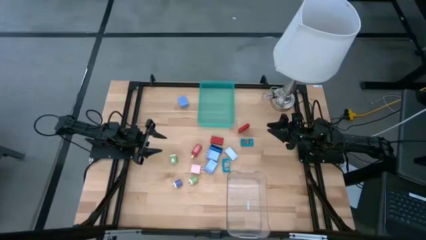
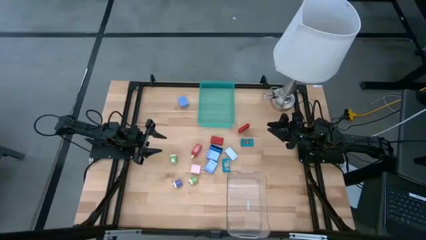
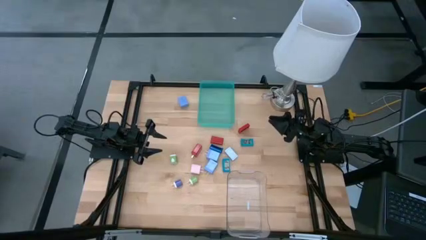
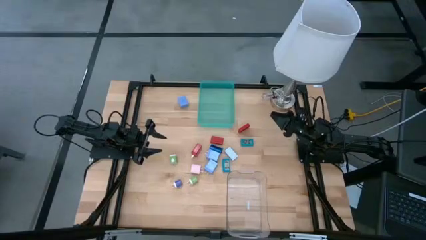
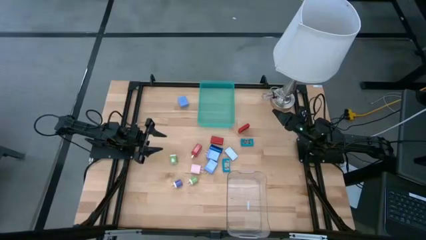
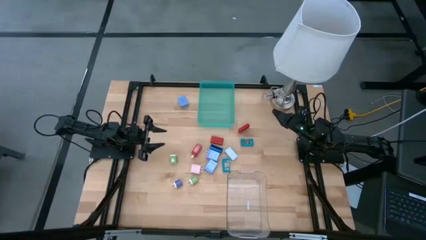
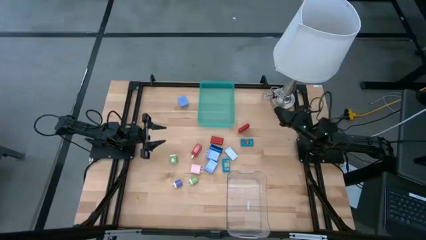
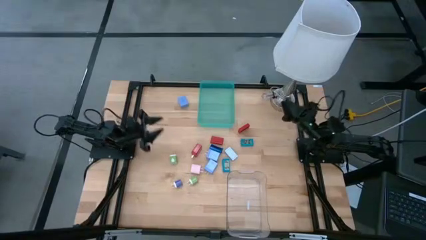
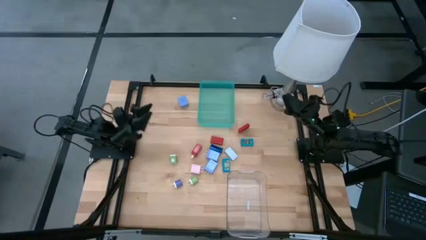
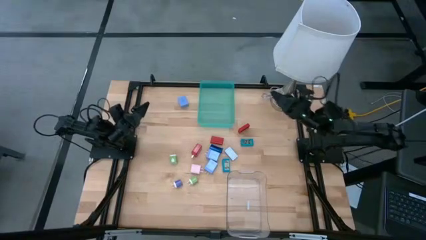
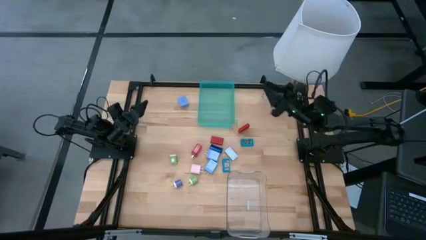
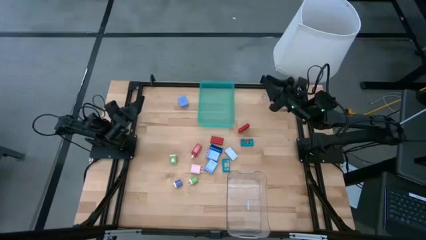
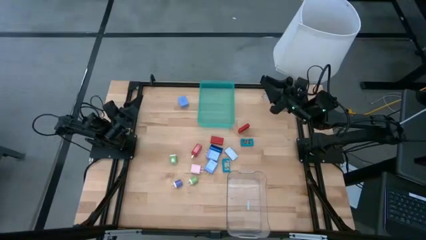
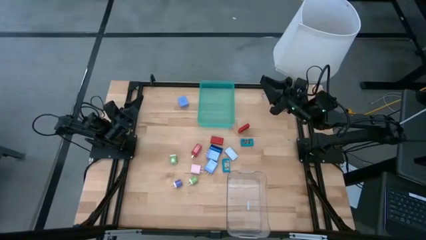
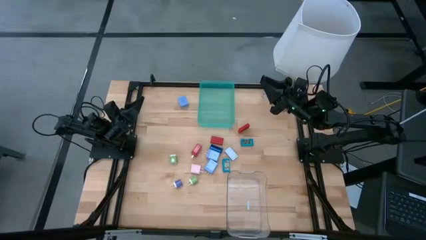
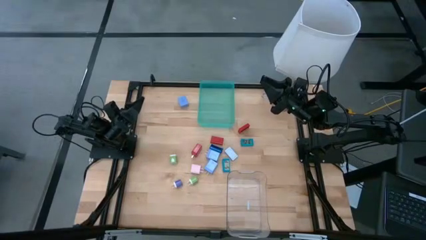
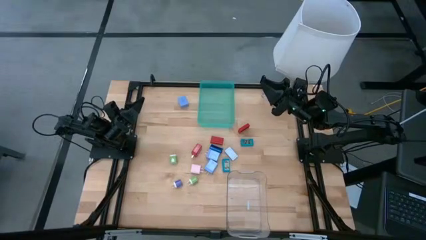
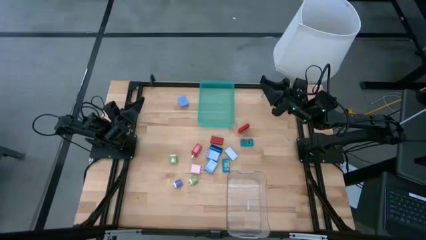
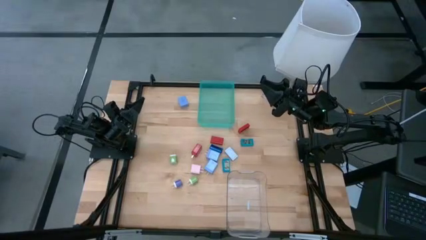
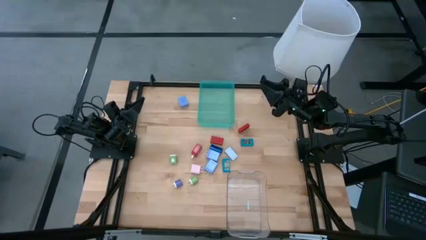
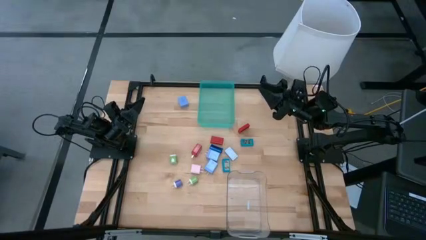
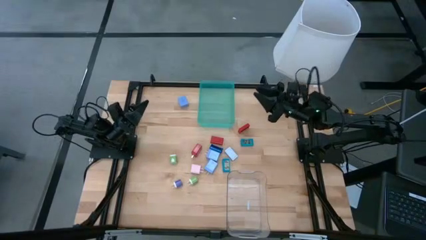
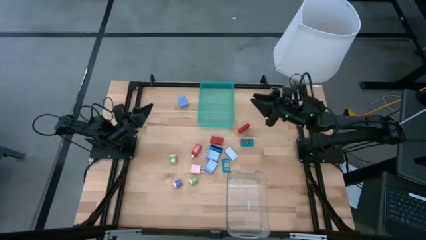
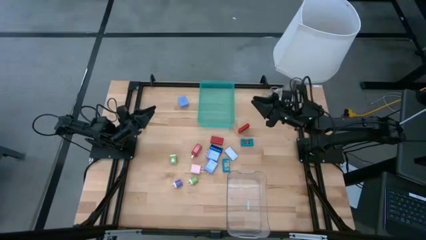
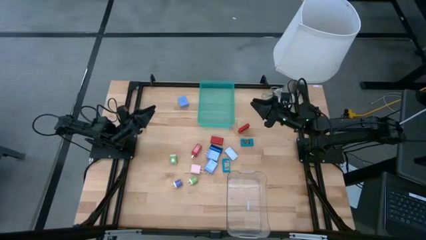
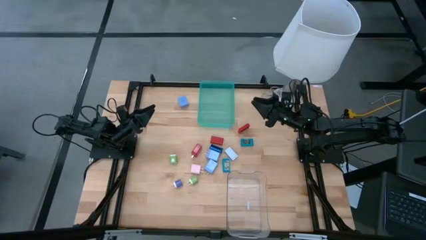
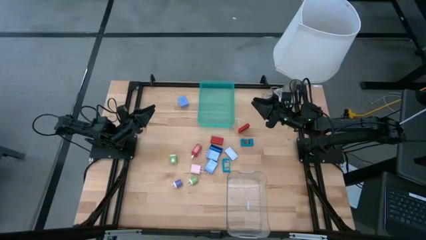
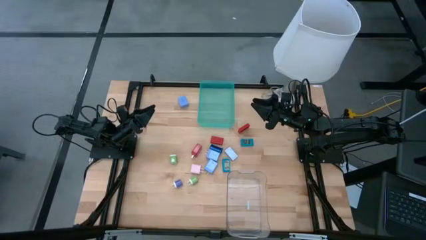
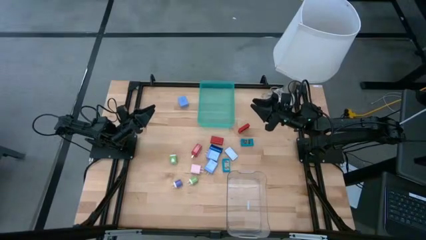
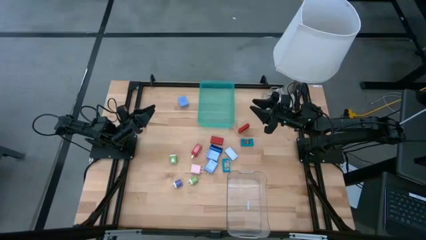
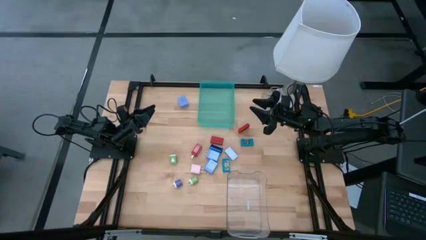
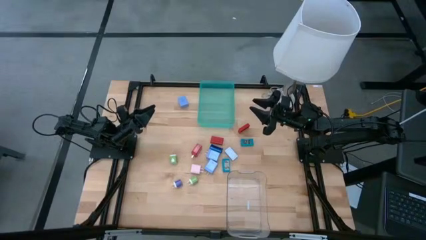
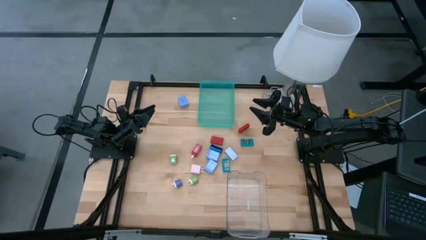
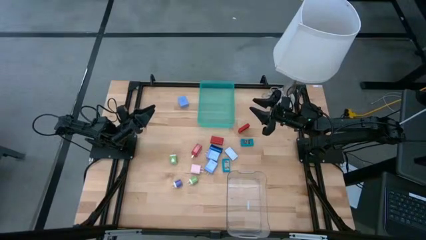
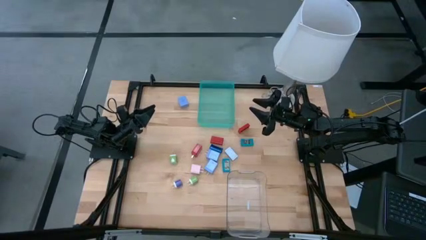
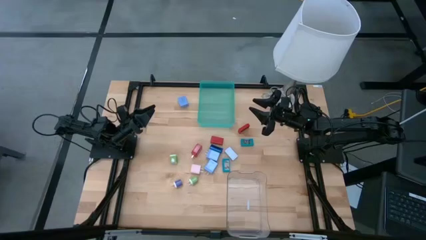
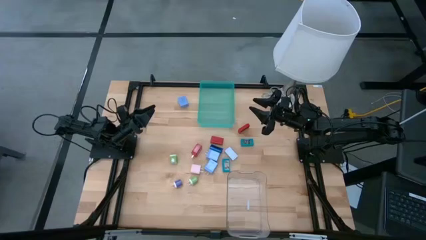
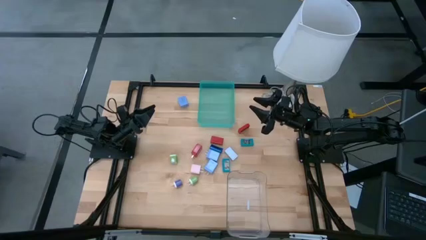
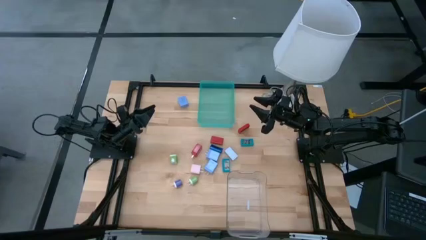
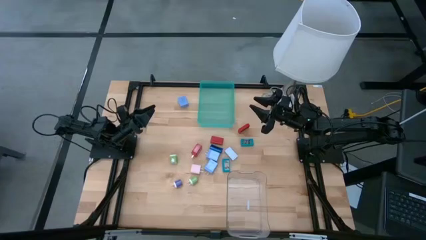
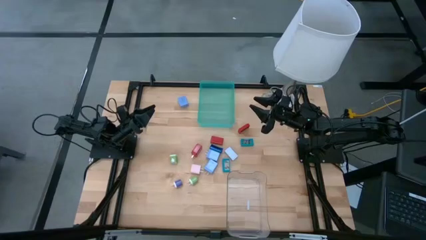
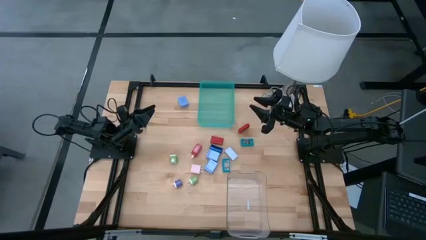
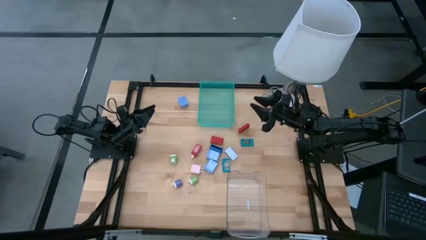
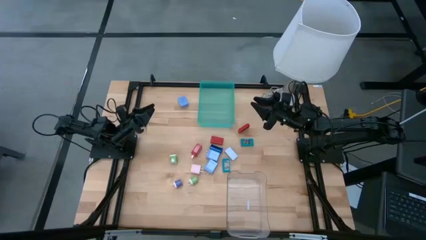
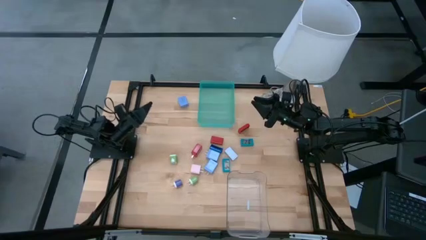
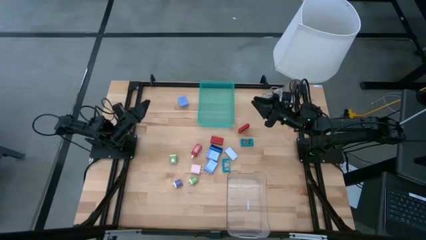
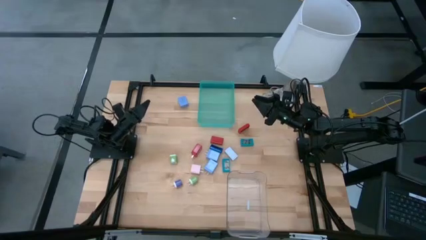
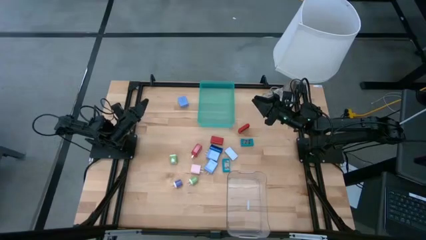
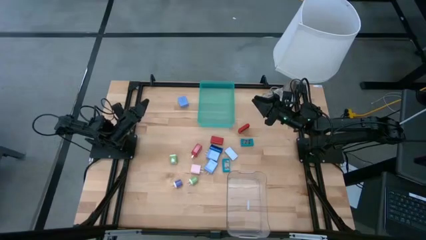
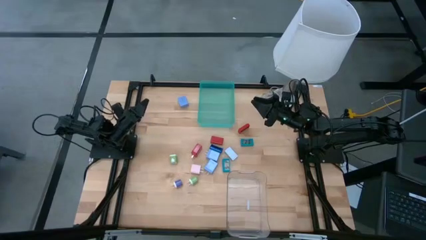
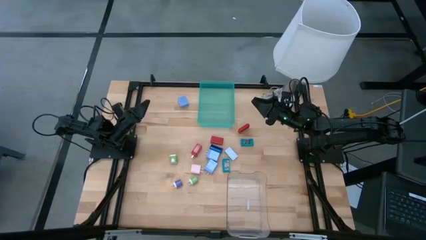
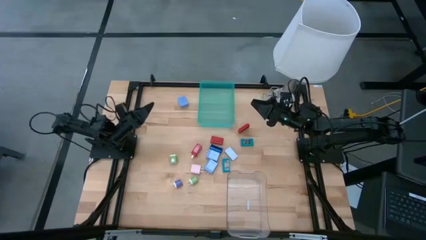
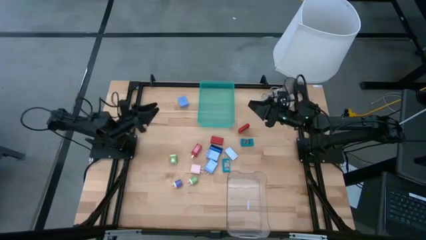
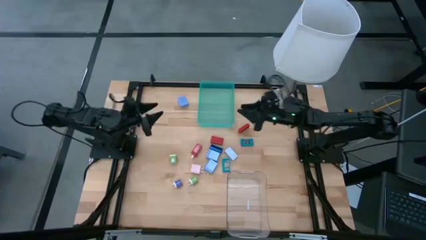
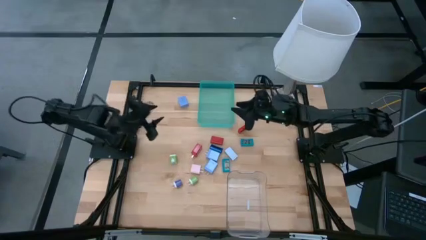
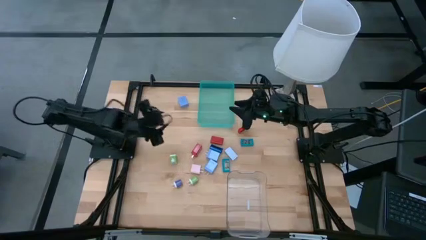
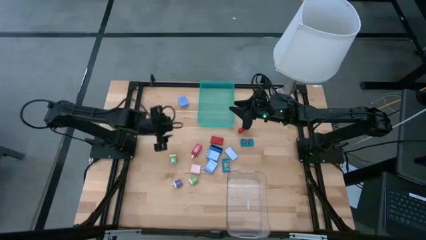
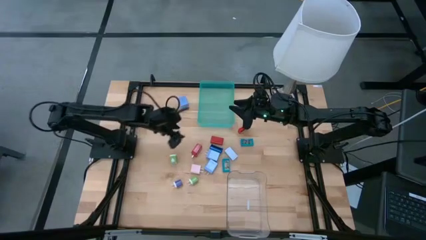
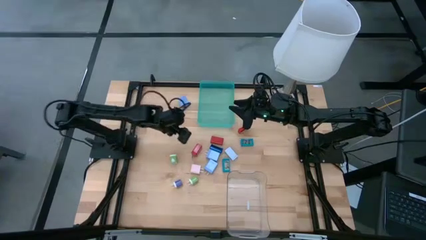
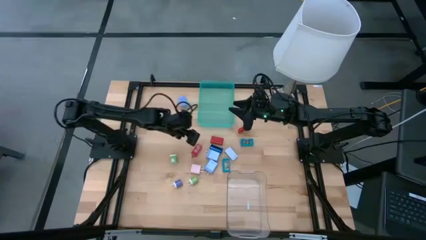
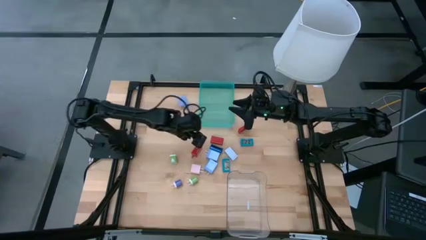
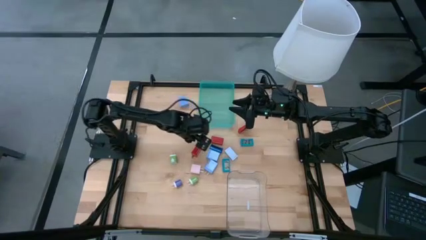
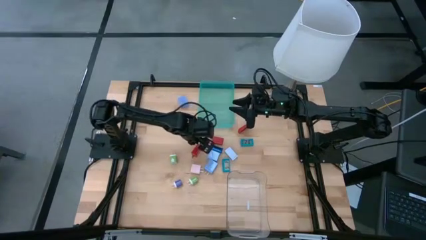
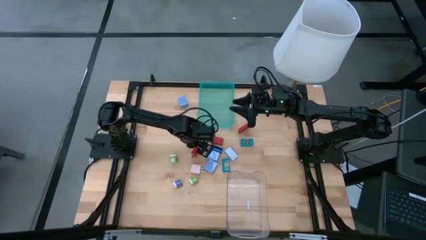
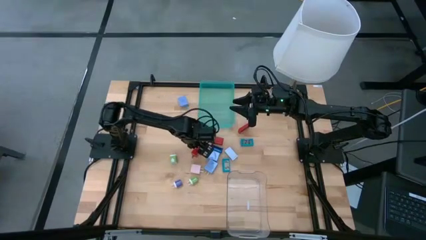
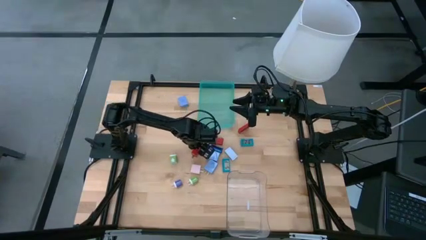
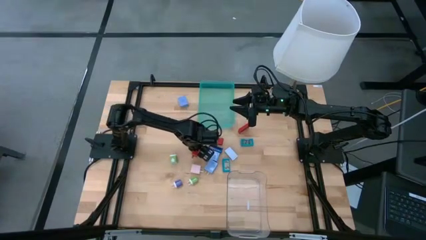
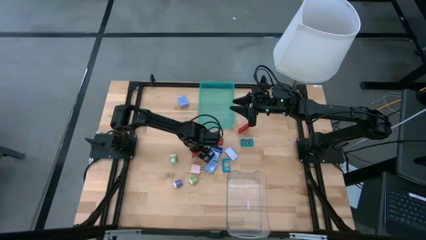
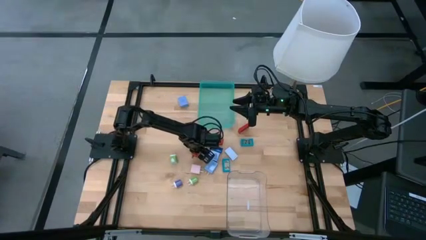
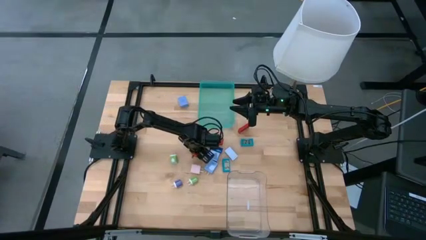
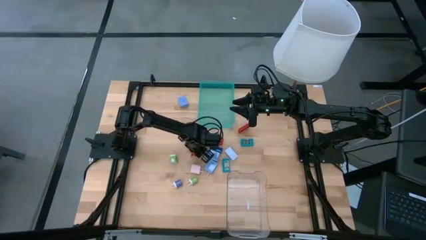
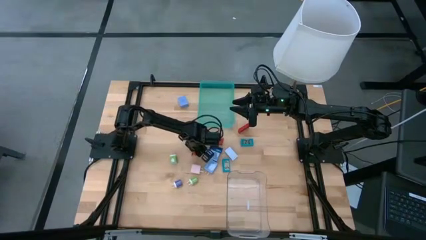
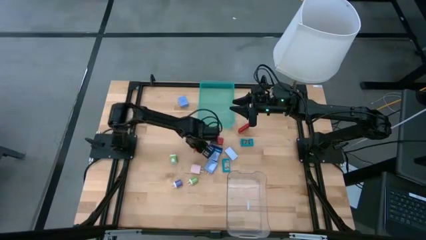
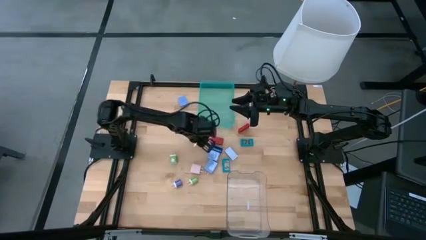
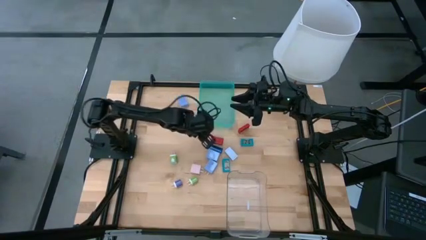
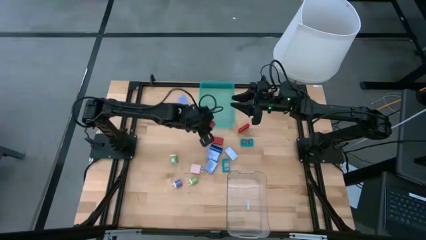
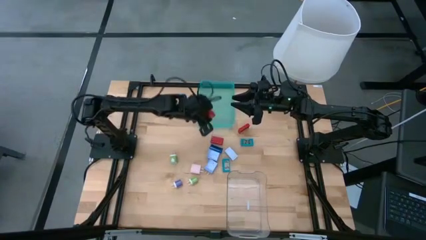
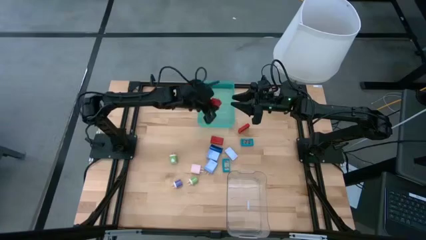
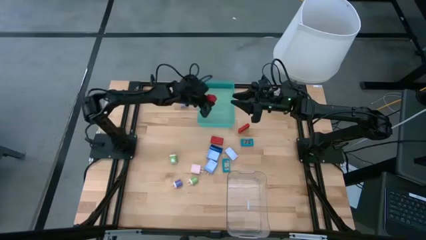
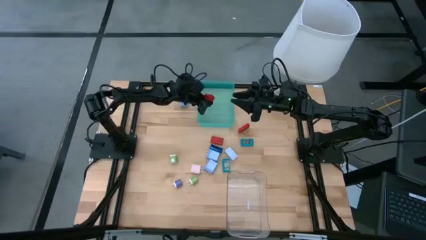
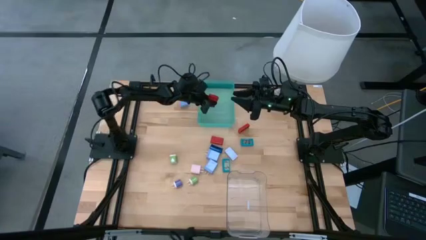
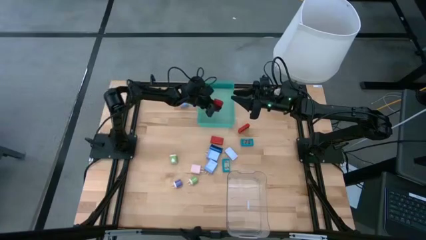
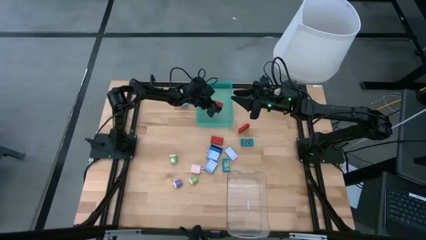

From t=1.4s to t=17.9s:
Task: Pick & Place Office items
Put the red charger adapter into the green bin
